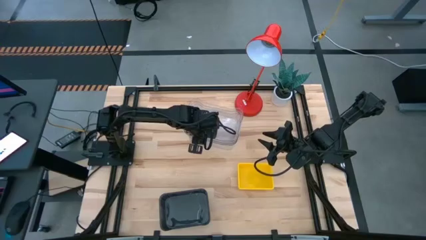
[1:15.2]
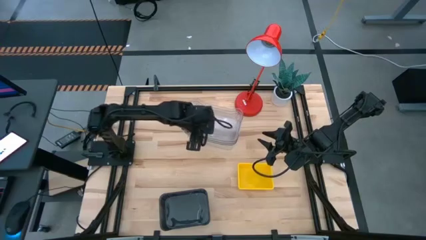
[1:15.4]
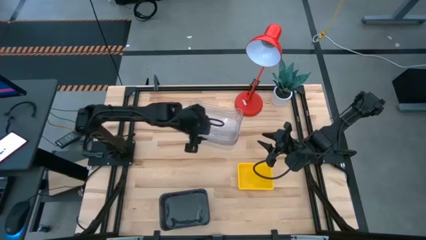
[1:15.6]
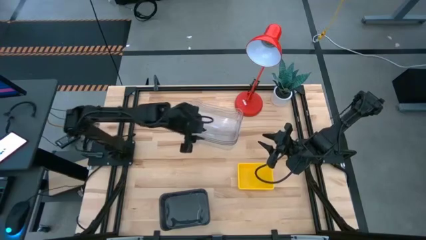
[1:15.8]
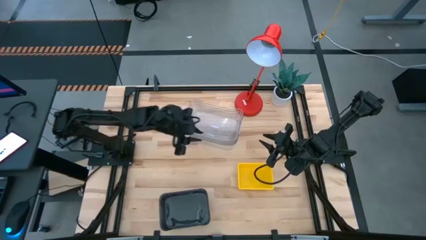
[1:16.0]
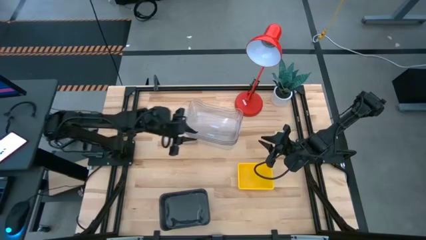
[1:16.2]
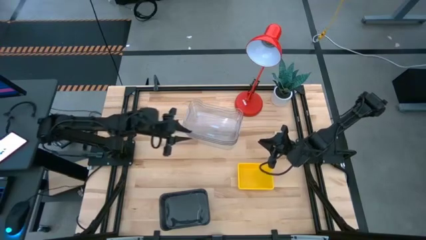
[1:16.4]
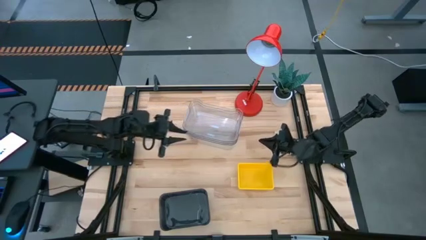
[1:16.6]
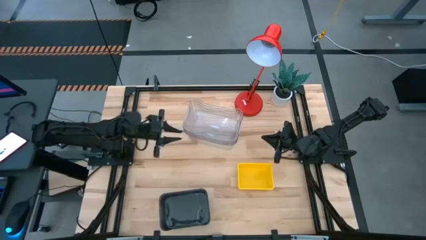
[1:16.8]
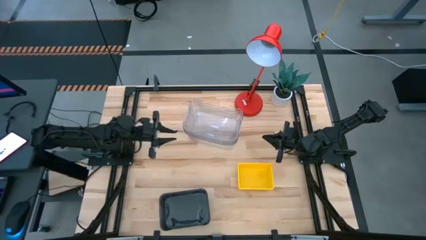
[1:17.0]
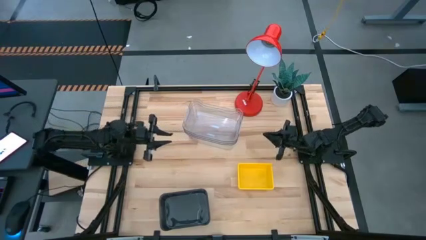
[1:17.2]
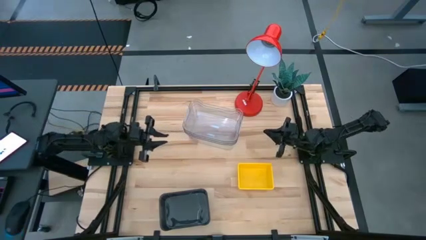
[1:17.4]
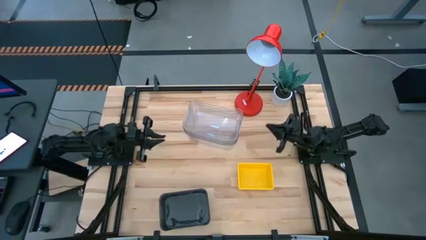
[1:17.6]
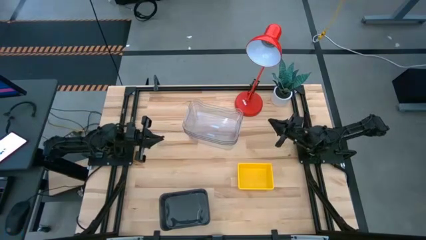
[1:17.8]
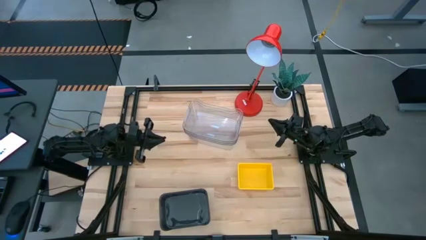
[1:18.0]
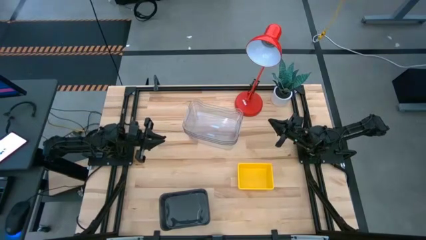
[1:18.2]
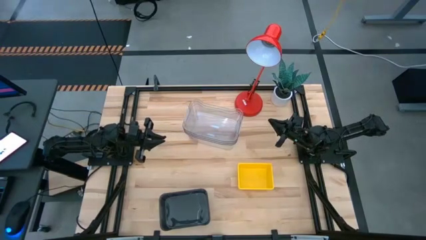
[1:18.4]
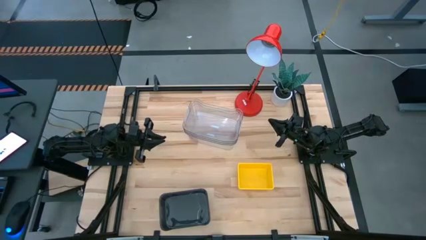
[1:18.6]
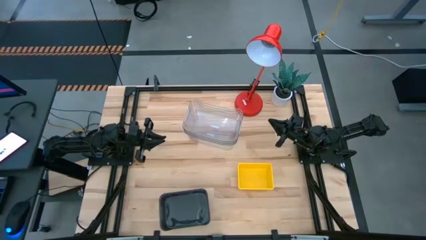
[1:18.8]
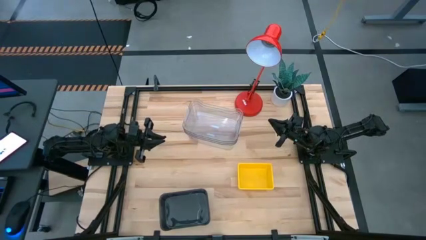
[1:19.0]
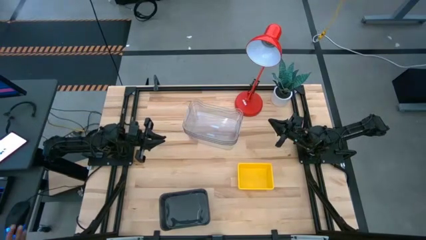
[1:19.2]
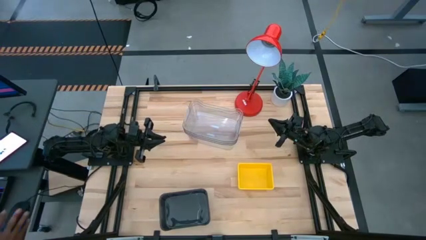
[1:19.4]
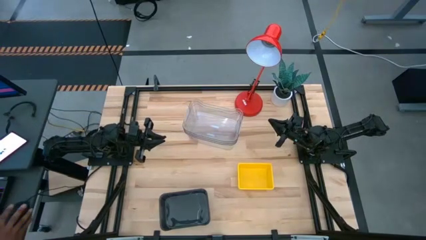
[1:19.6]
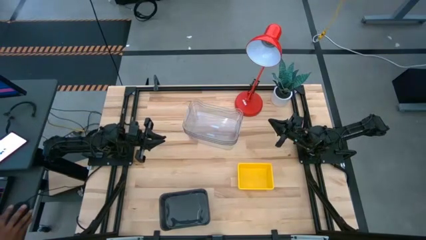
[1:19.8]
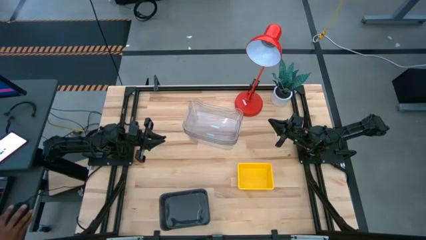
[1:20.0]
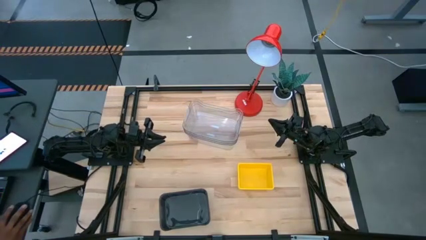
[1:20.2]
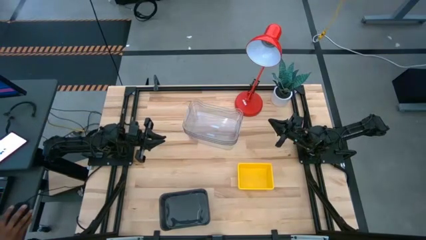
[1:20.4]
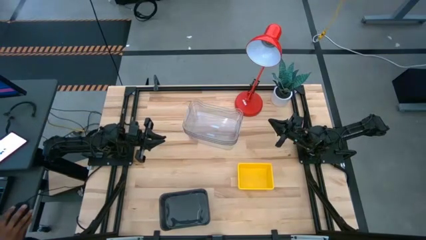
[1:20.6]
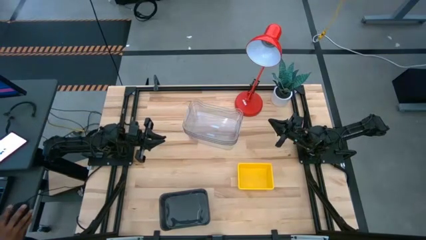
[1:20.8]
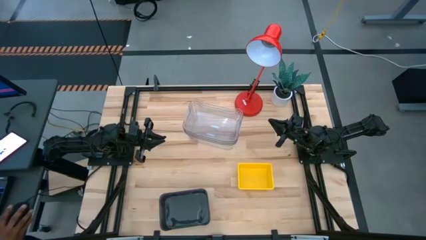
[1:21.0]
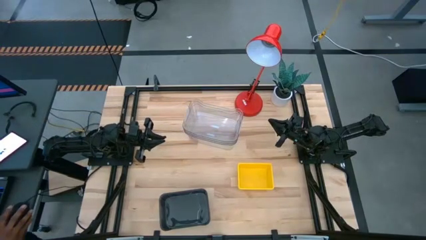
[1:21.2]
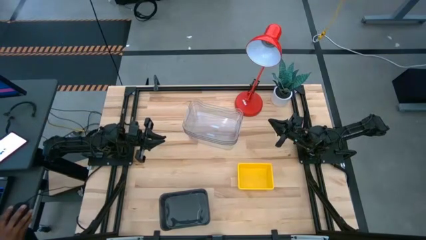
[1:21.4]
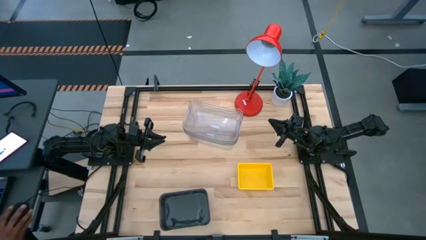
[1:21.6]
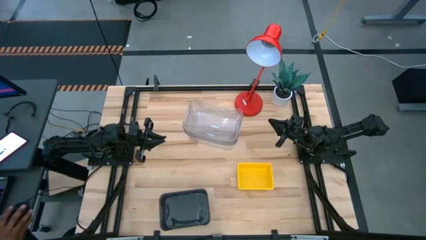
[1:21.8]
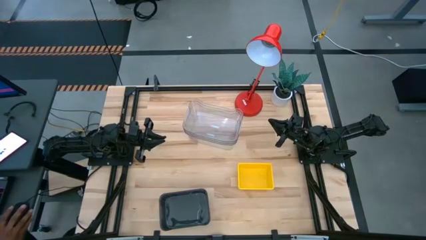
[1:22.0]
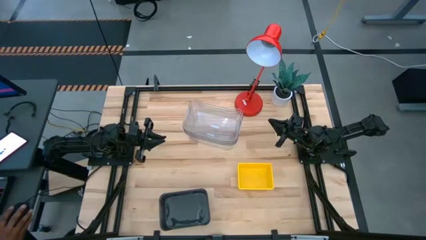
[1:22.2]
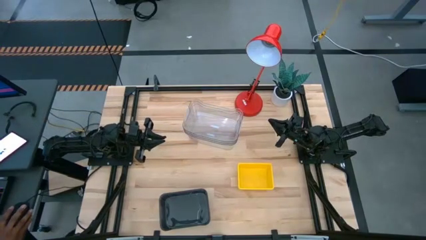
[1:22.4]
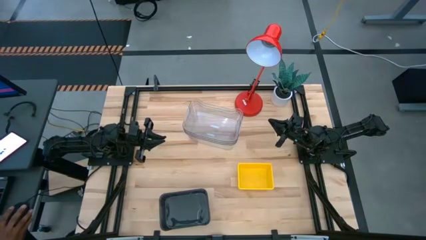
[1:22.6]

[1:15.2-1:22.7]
Return to Home Position

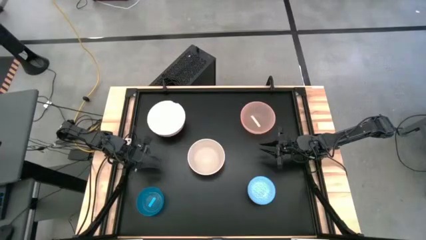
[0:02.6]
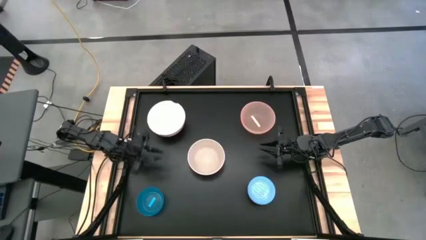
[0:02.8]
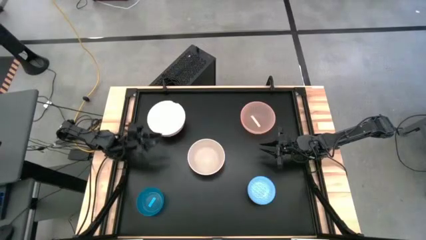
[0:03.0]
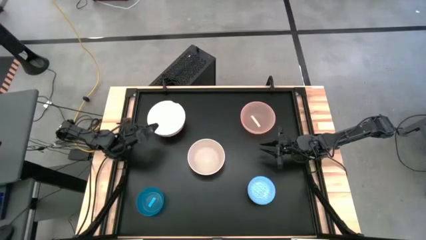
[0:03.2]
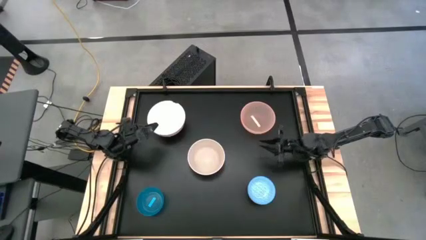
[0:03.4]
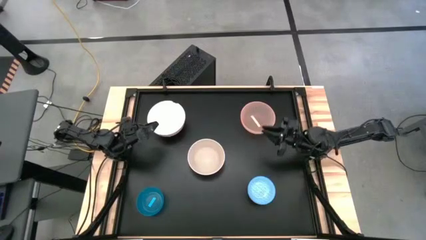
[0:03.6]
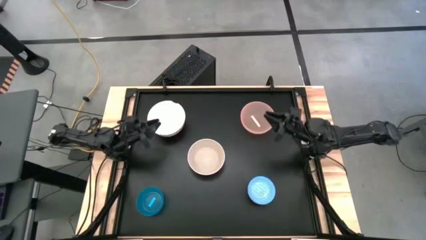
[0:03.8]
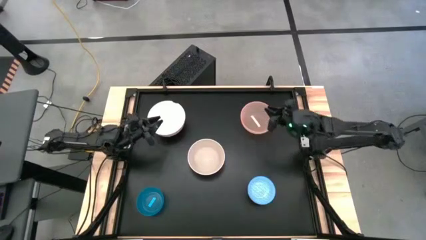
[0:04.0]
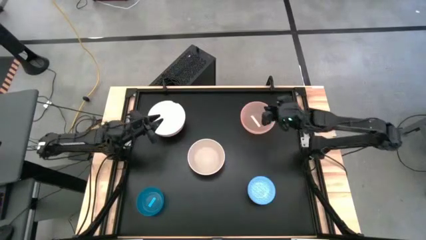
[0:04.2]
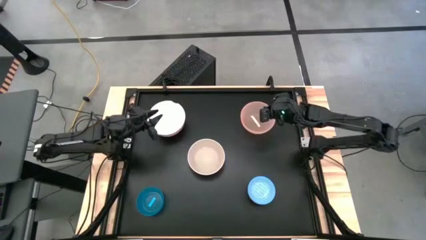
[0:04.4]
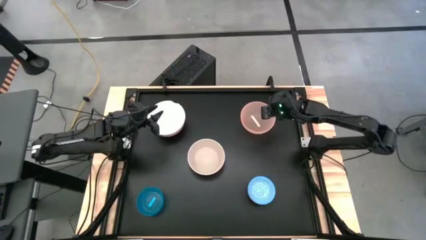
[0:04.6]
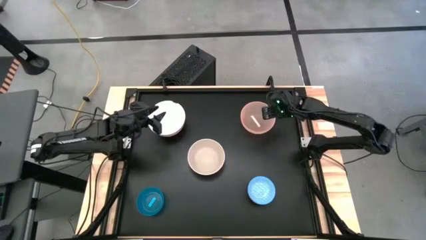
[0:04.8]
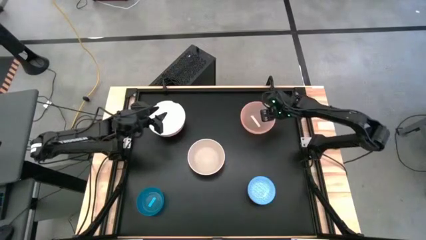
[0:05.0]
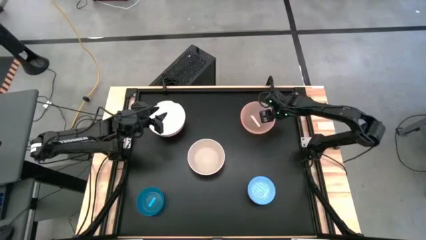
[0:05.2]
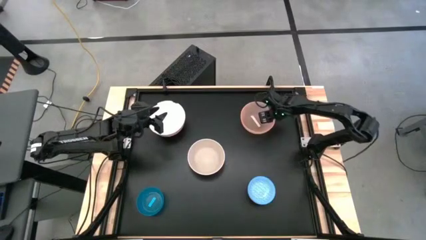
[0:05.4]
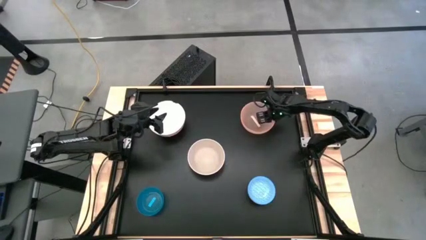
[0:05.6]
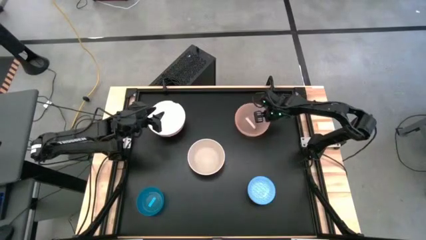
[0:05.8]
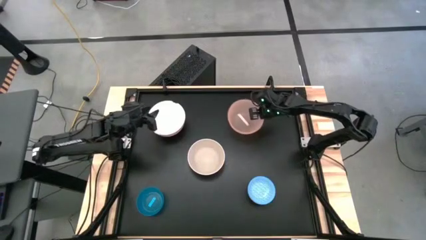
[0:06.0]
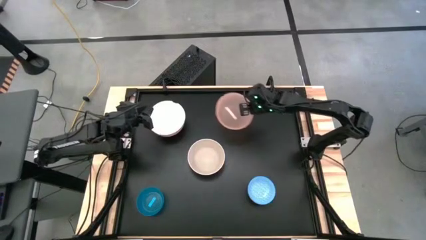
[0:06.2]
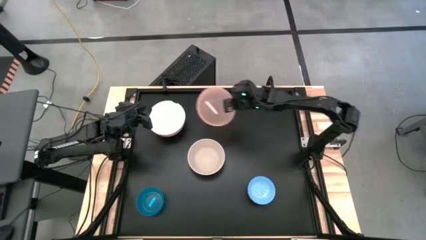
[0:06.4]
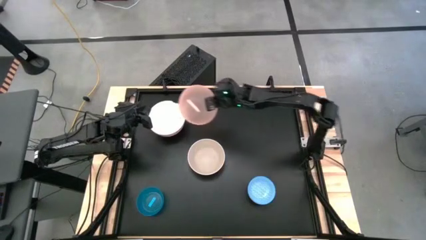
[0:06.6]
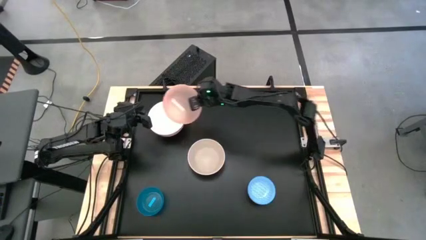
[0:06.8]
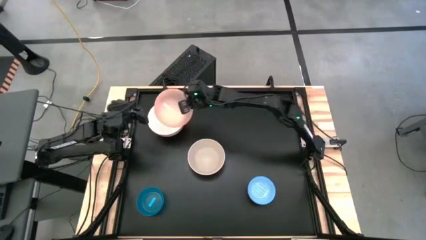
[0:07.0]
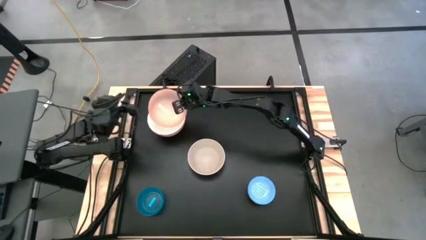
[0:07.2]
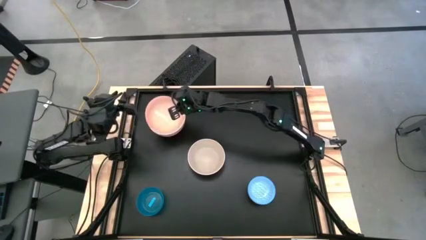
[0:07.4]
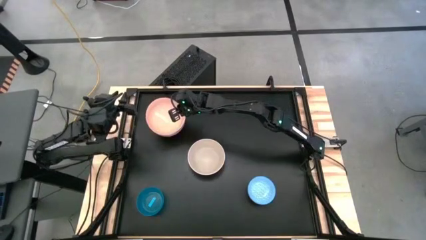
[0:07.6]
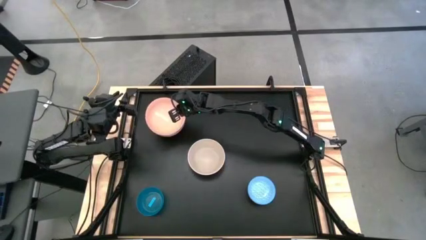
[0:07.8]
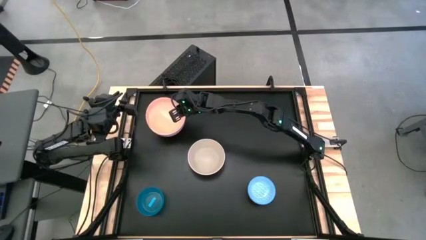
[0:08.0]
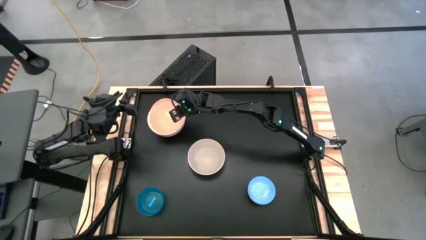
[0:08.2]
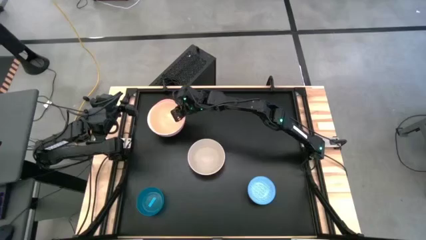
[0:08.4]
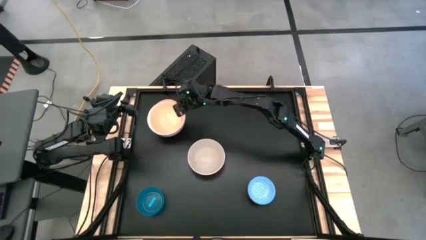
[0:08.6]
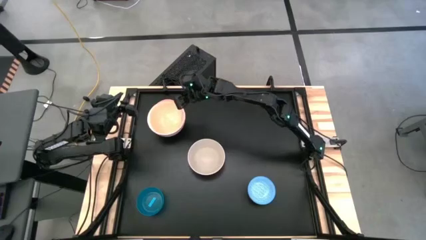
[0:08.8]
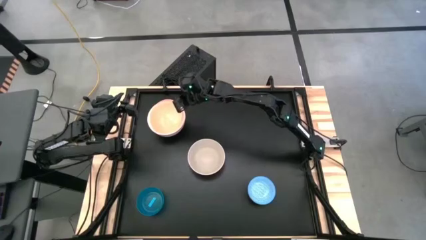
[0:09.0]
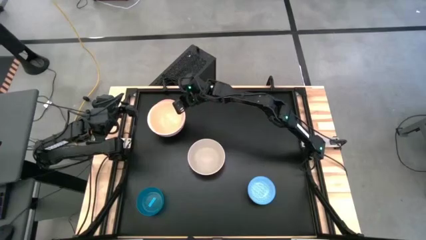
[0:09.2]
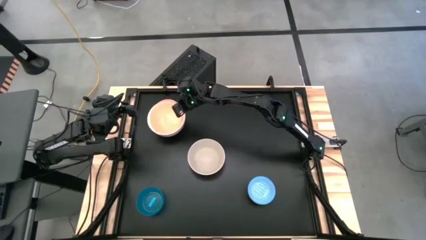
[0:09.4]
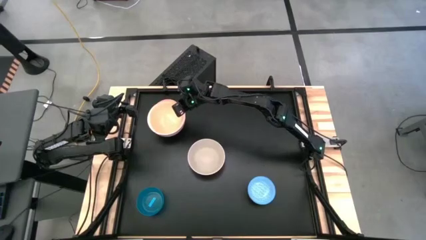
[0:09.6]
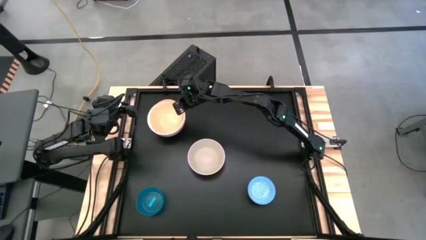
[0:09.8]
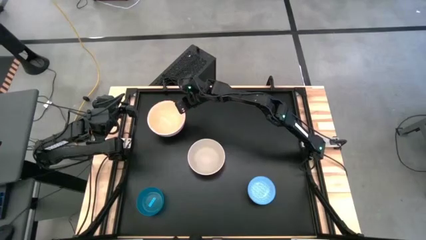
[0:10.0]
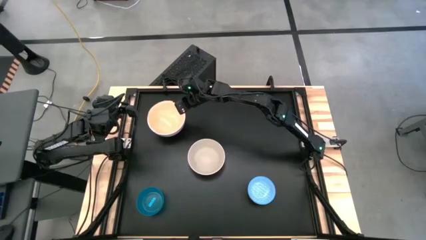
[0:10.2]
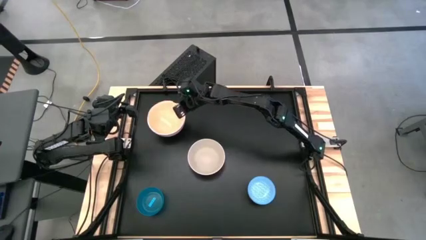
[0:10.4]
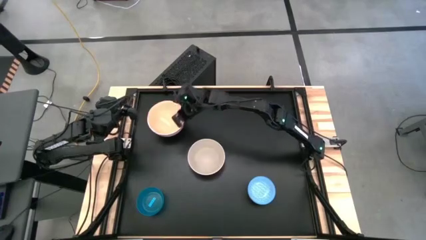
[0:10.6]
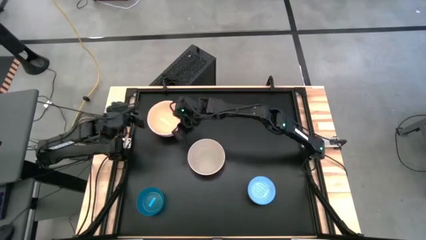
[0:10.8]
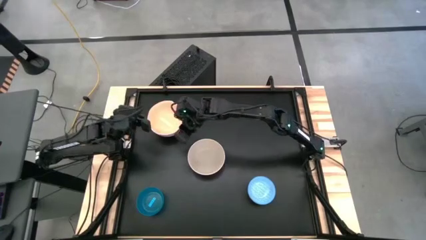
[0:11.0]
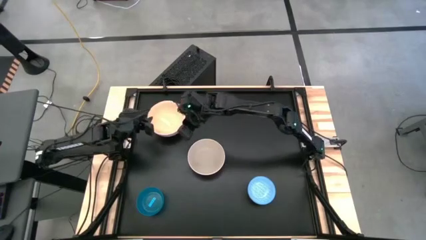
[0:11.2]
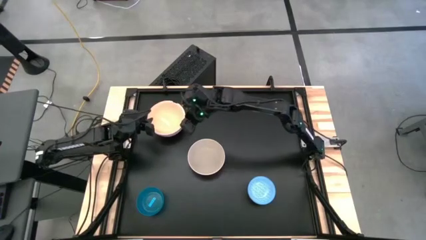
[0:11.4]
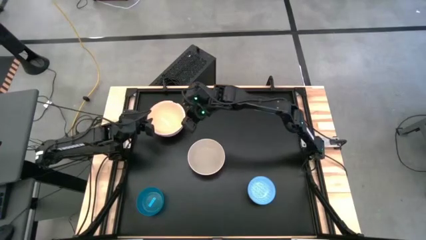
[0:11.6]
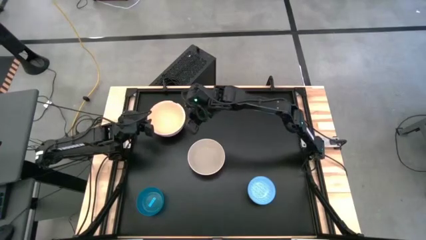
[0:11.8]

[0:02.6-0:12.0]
Stack the orange bowl on the white bowl

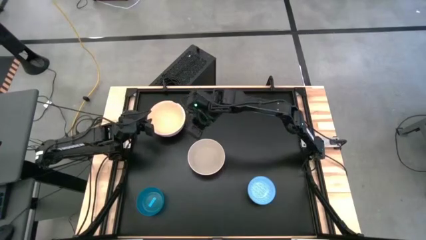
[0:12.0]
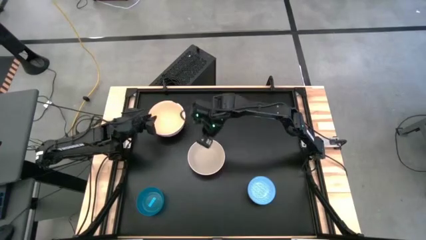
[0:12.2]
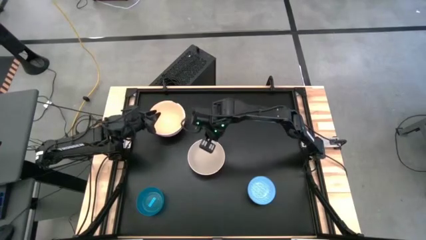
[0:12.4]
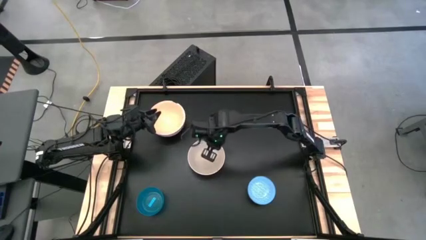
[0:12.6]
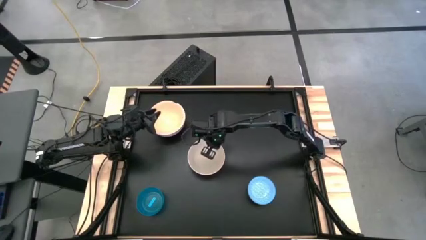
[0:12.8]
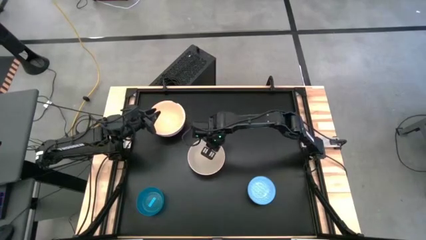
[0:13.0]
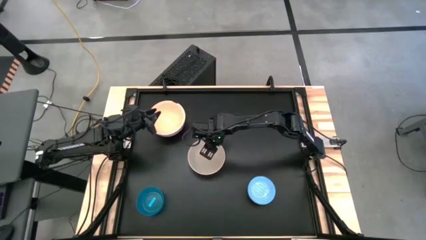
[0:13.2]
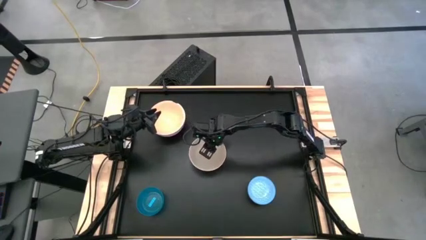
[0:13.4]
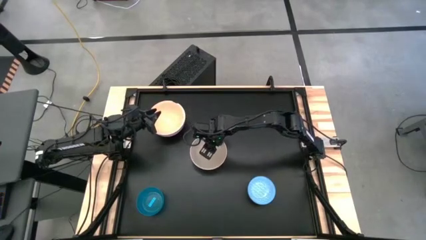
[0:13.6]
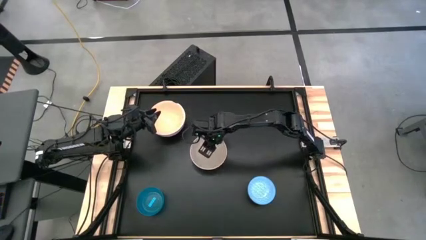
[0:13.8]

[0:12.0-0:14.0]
Stack the gray bowl on the orange bowl
